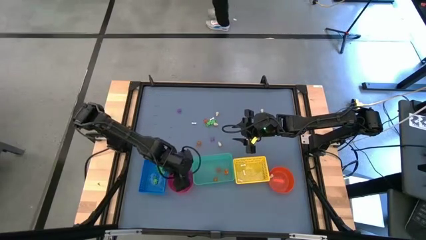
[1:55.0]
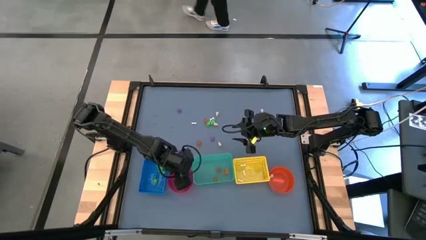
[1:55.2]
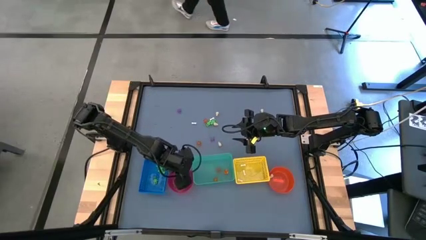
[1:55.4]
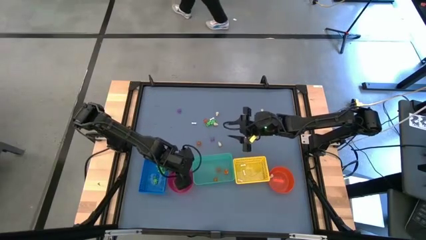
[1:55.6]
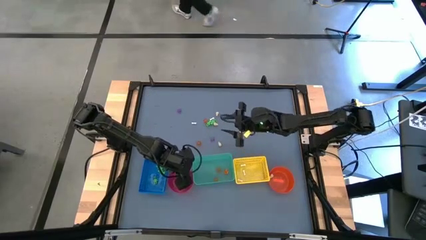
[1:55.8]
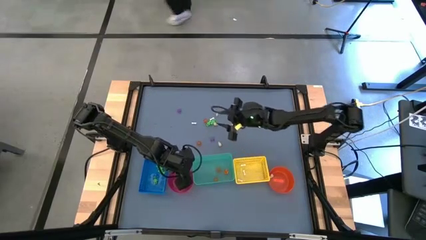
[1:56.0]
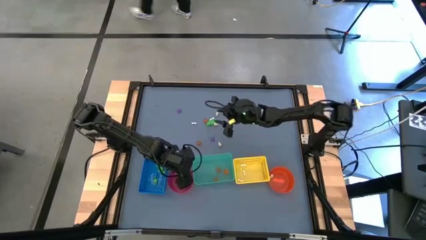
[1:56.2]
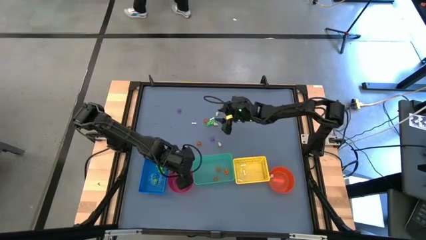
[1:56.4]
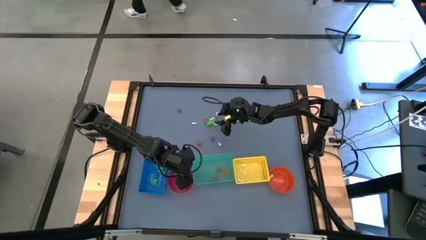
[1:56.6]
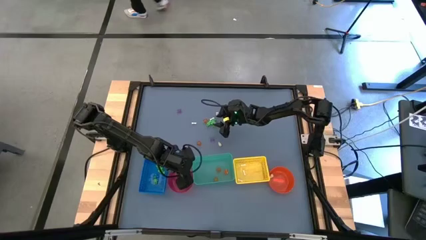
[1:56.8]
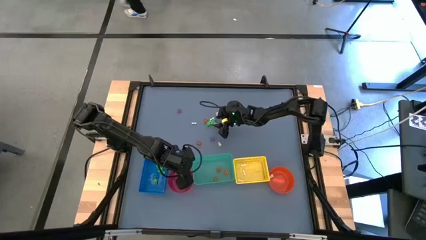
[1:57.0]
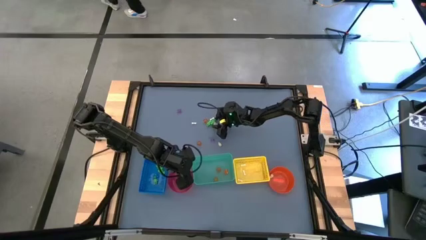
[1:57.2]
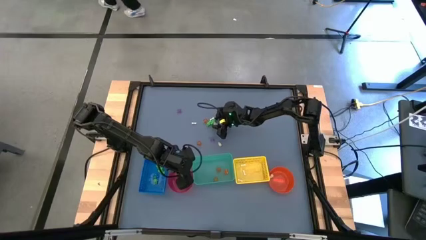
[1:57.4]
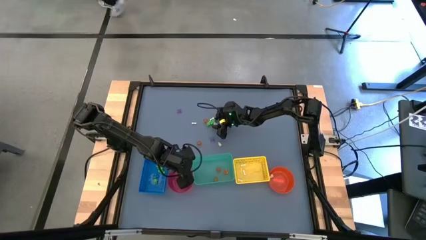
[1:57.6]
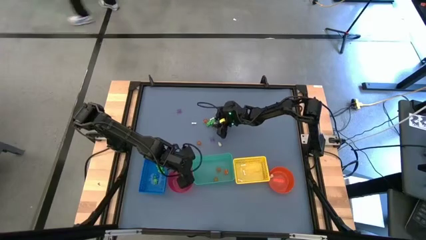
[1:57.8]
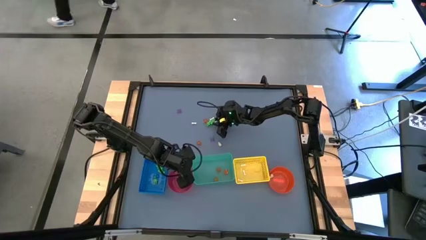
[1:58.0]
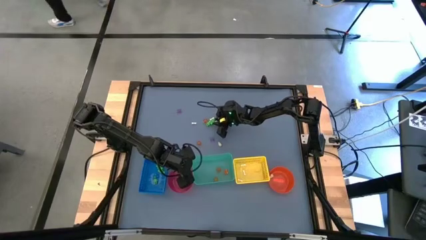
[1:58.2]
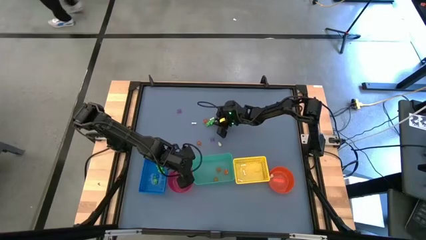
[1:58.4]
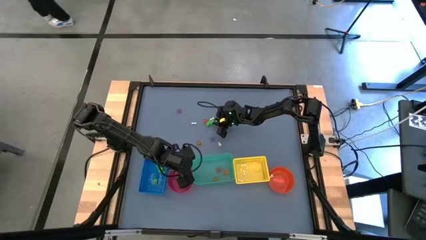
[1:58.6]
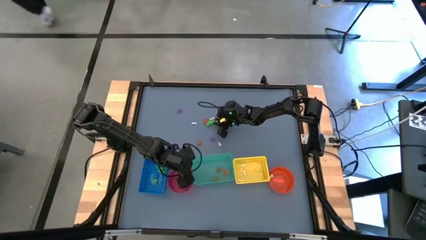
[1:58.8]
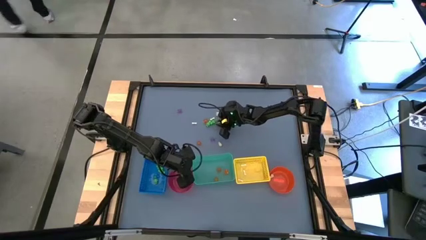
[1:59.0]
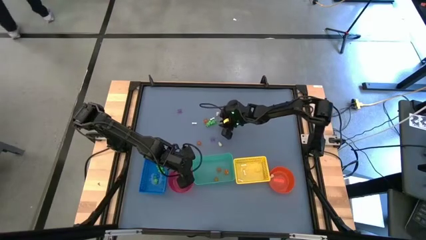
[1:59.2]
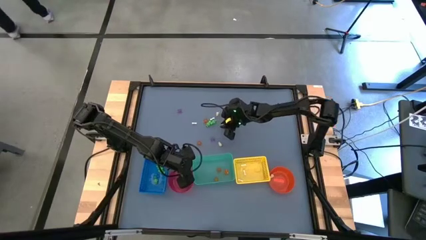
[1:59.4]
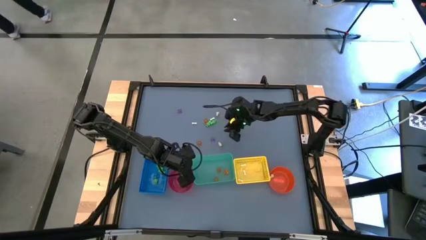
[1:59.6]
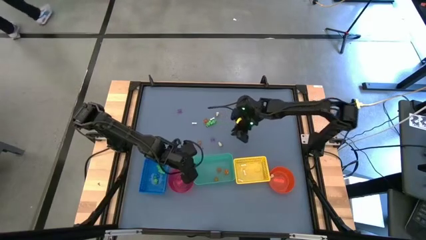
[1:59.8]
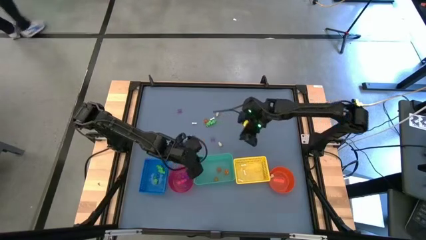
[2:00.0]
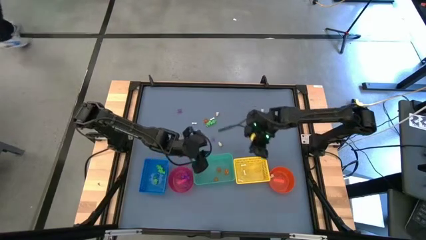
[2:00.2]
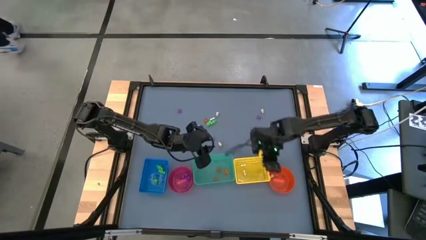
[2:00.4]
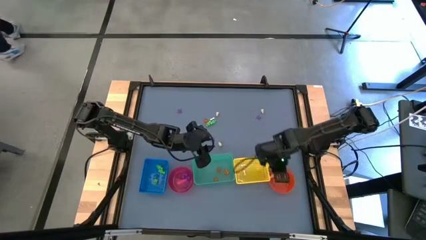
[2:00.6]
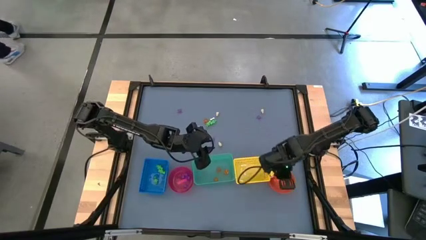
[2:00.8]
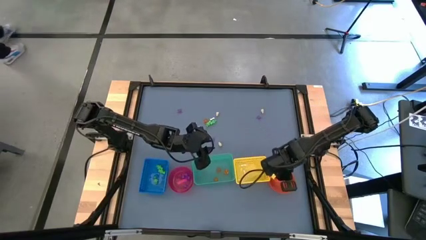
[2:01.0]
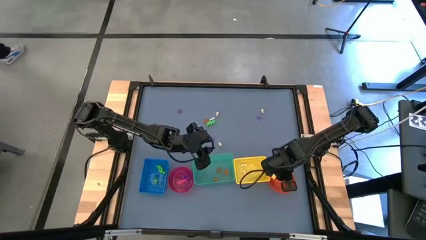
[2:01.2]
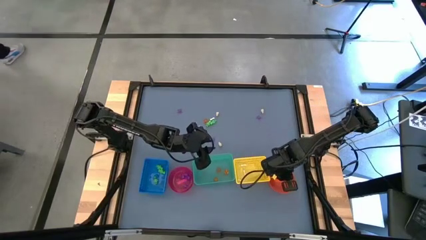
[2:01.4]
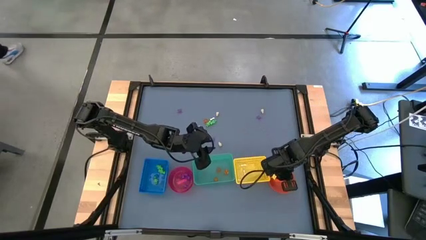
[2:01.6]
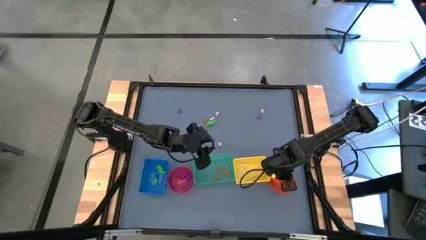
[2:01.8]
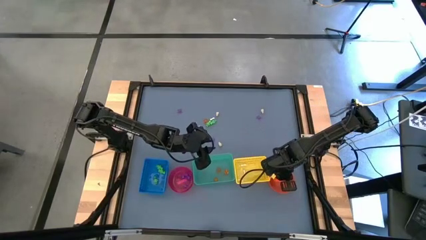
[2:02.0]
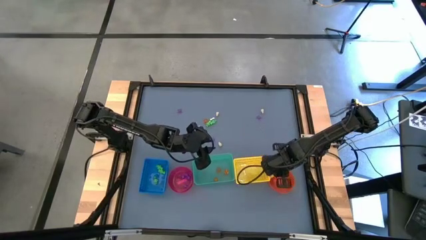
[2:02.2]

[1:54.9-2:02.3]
Task: Sort Halloween decoration
Put the white skull toy into the orange bin

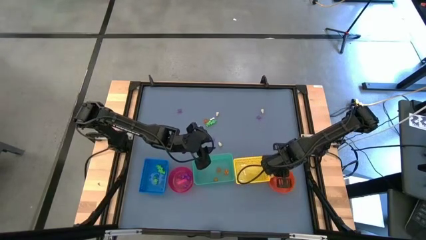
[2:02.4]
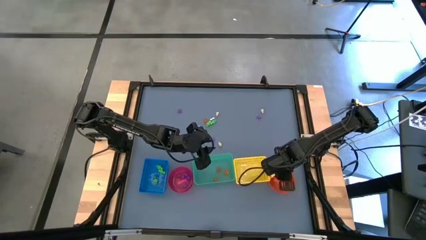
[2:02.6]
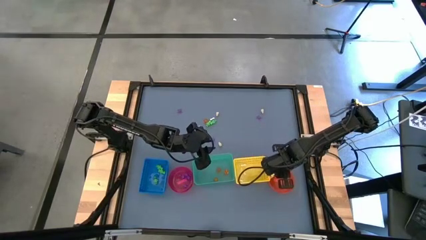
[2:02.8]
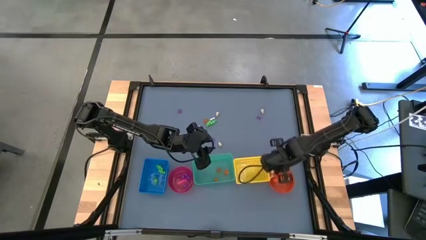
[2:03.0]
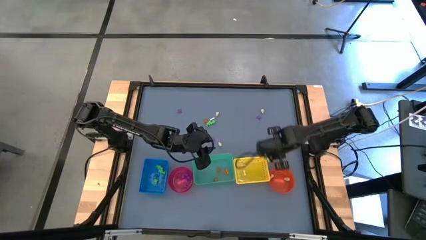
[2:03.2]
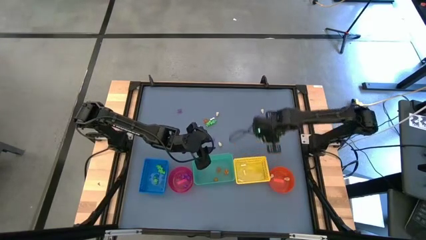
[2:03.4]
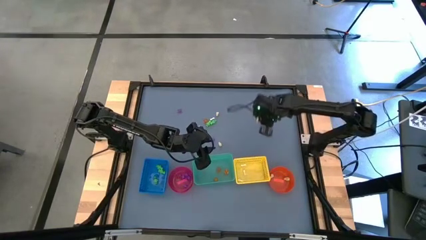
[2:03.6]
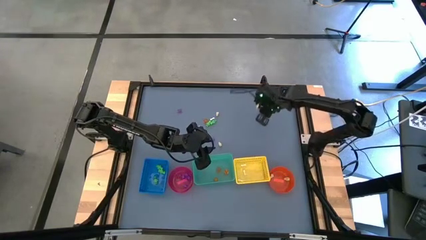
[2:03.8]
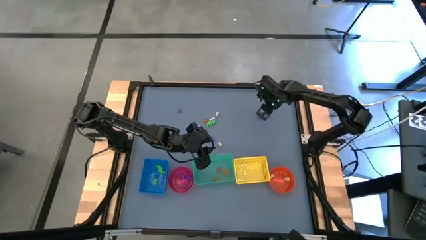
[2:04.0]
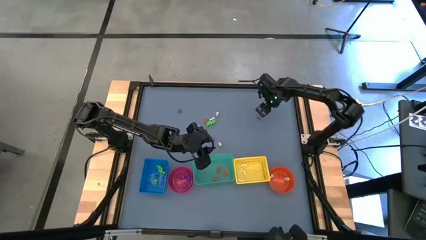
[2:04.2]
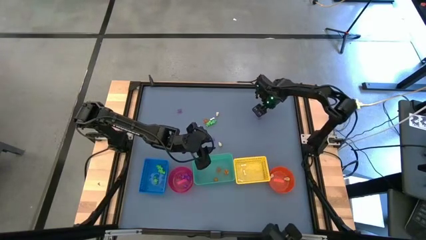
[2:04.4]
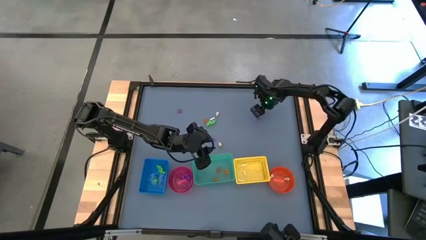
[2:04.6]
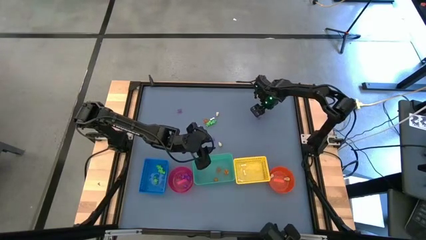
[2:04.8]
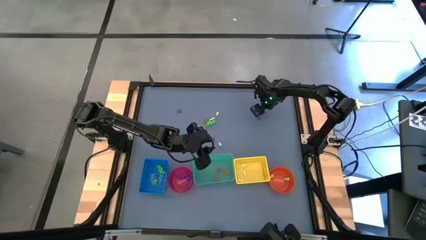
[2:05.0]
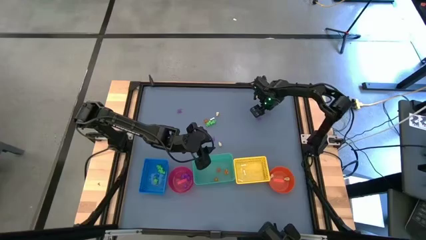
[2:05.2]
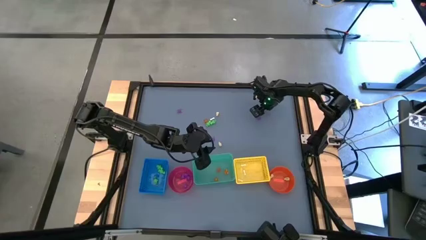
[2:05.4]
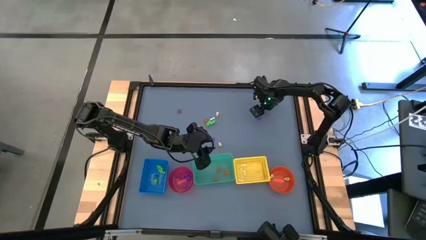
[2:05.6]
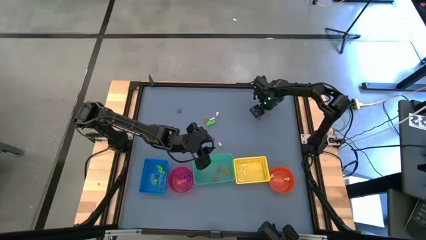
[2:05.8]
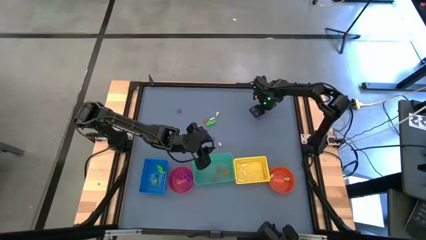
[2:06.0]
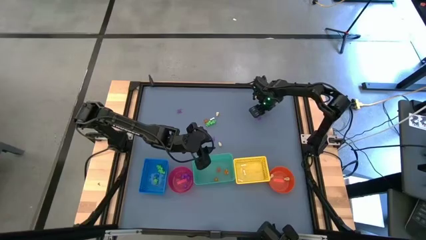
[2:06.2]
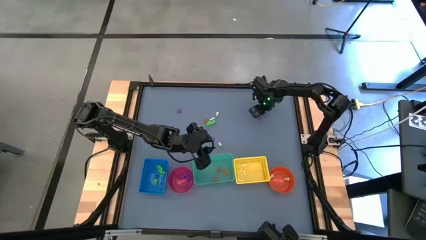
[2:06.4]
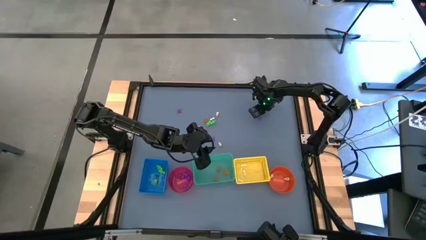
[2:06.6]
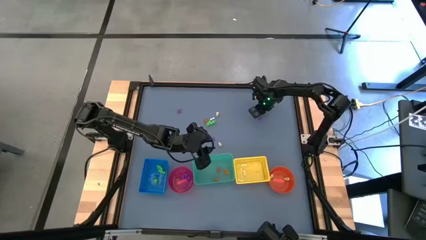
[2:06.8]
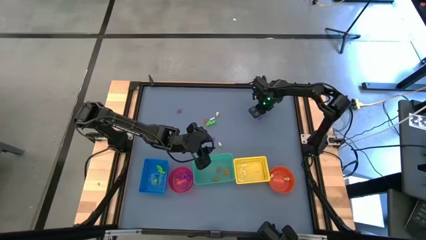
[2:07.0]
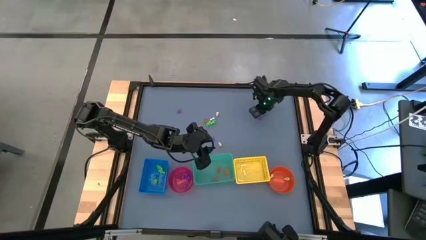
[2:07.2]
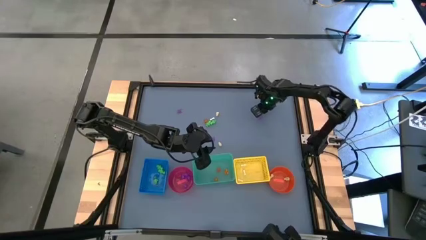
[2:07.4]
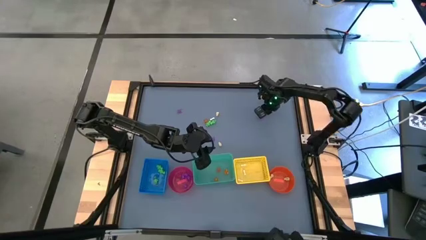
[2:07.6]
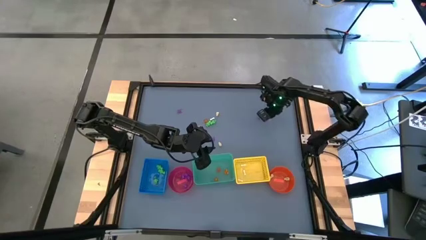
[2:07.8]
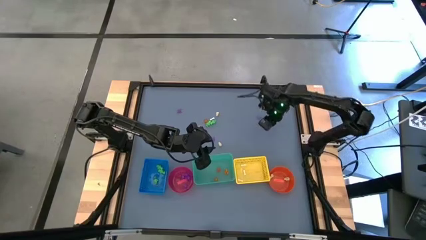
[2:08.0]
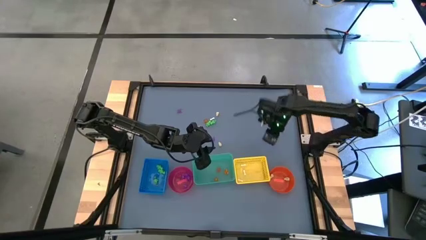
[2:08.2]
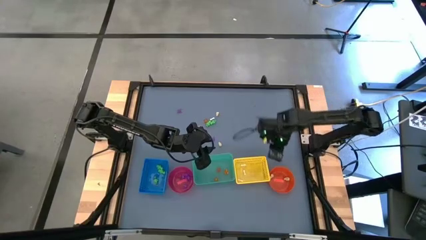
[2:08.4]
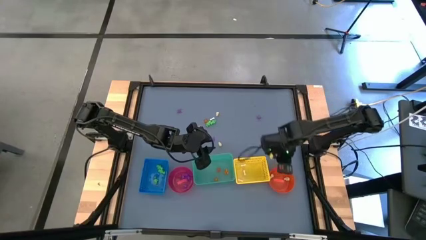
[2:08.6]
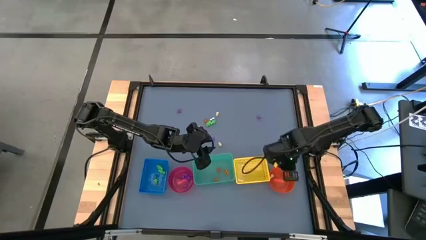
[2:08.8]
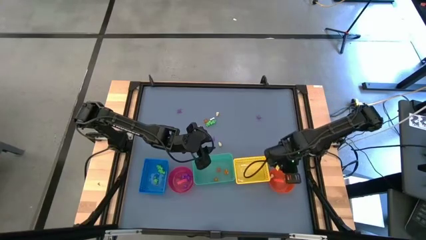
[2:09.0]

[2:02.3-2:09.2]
Put the white skull toy into the orange bin
